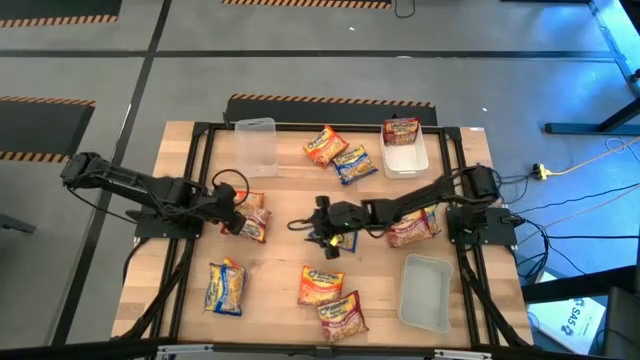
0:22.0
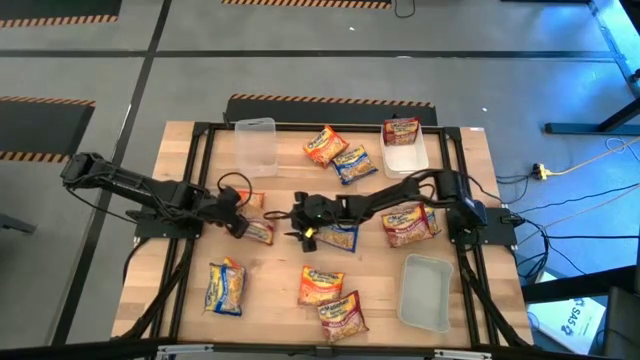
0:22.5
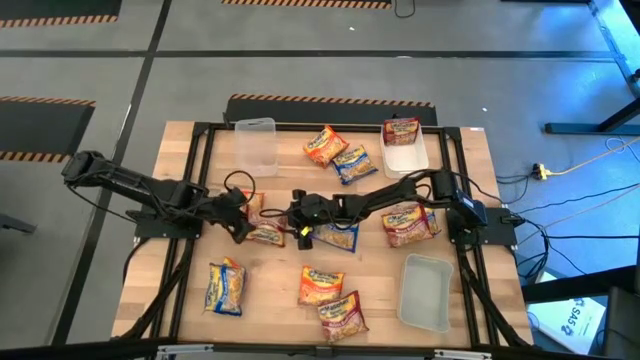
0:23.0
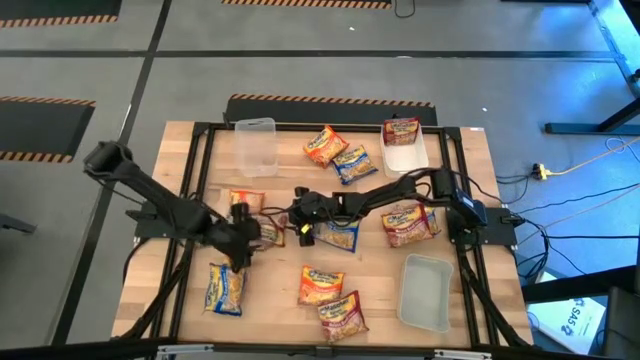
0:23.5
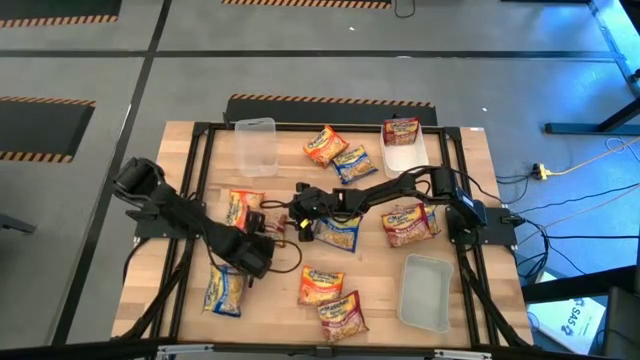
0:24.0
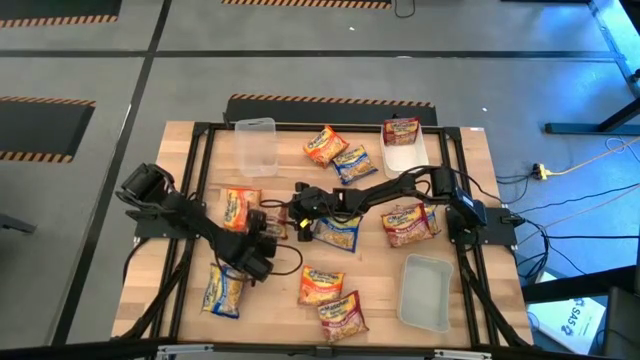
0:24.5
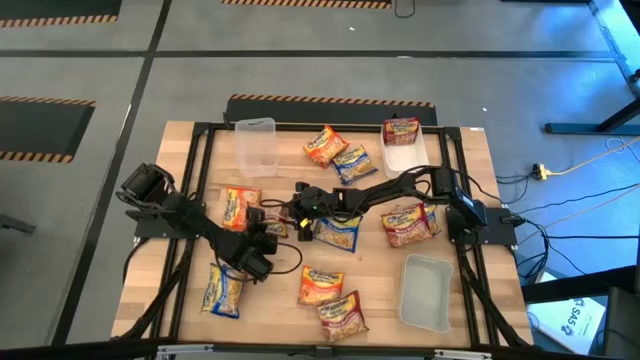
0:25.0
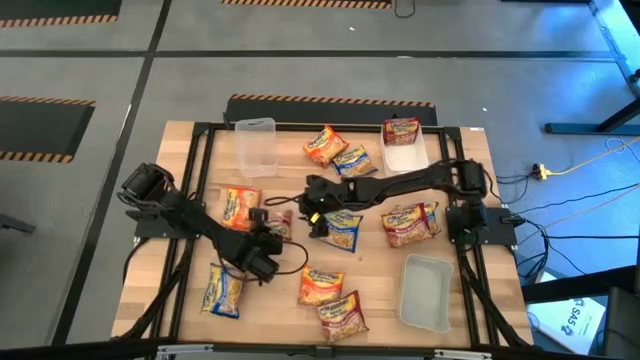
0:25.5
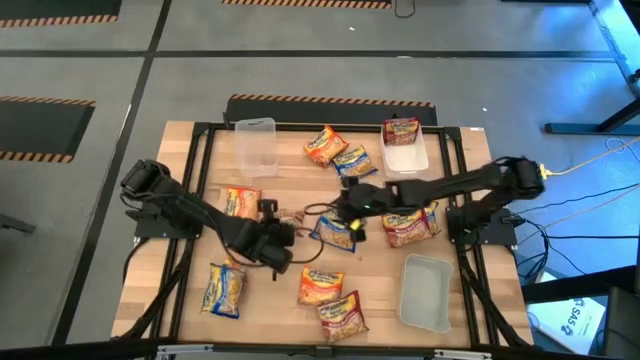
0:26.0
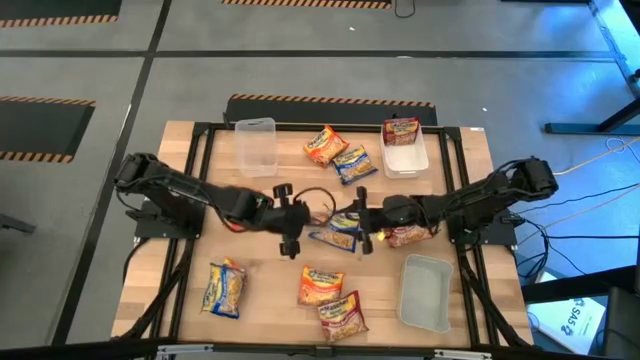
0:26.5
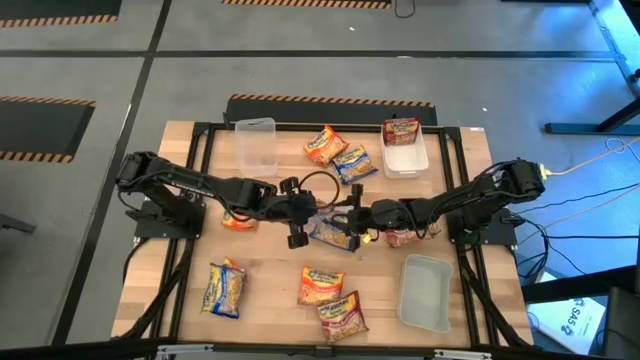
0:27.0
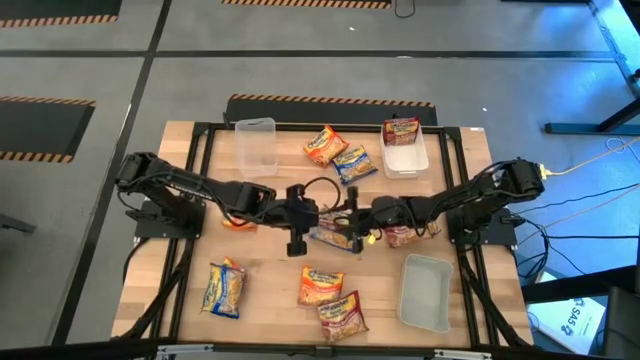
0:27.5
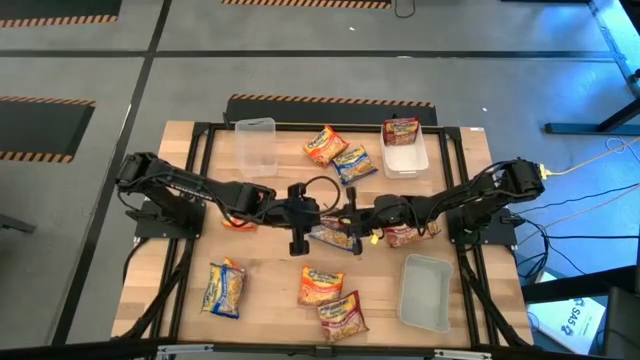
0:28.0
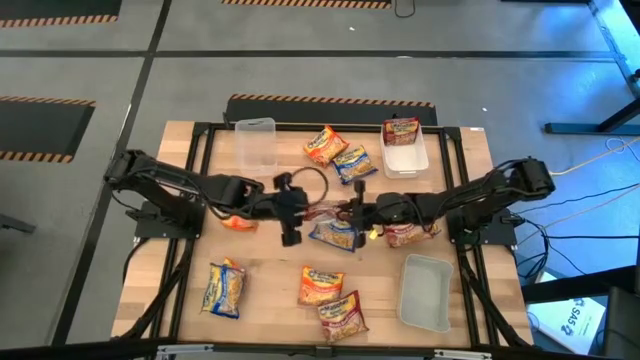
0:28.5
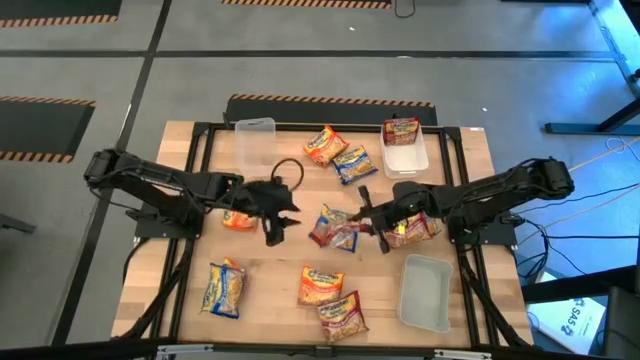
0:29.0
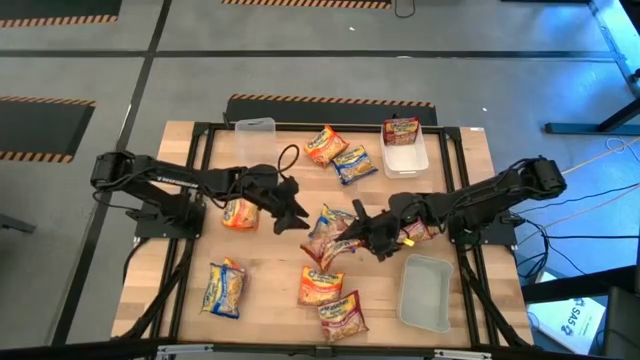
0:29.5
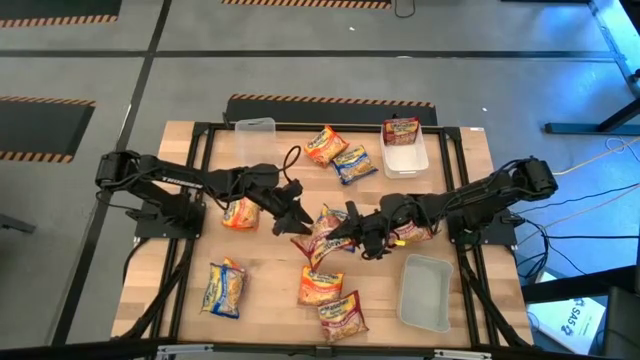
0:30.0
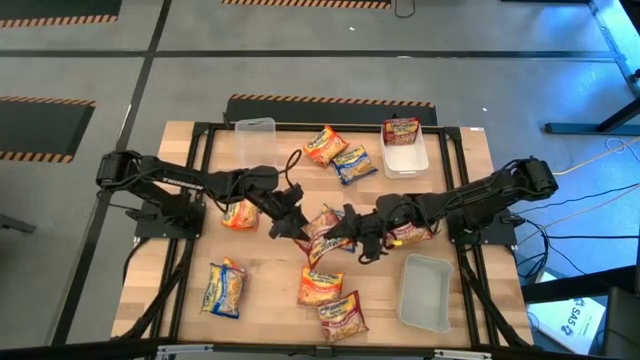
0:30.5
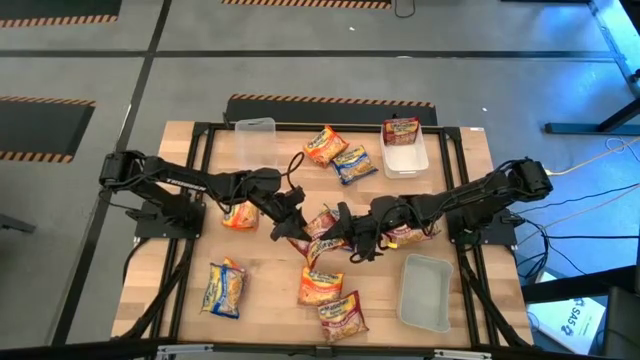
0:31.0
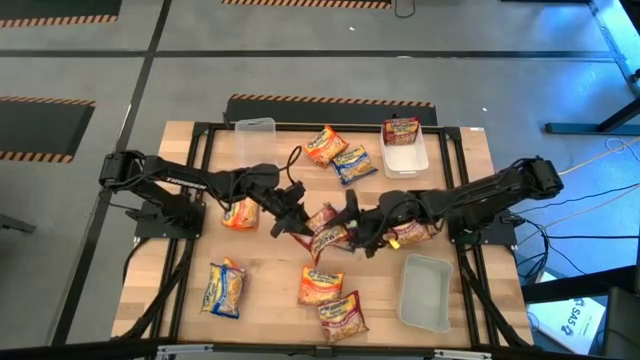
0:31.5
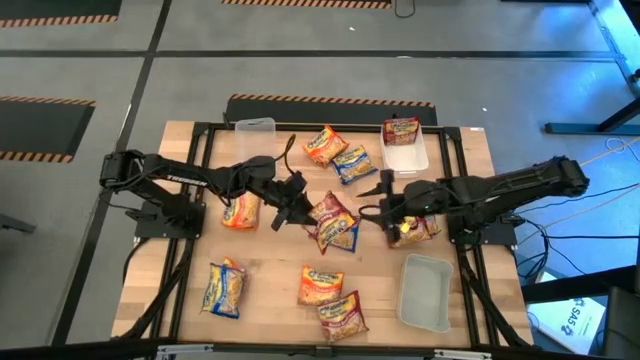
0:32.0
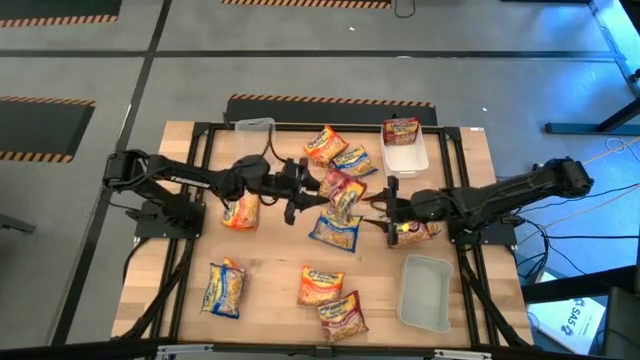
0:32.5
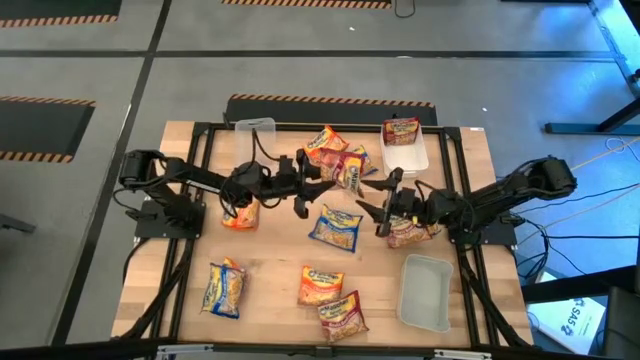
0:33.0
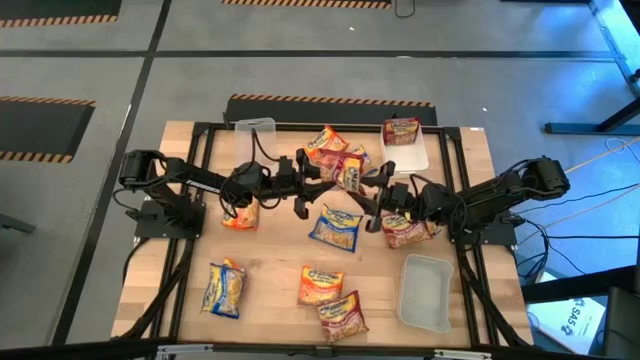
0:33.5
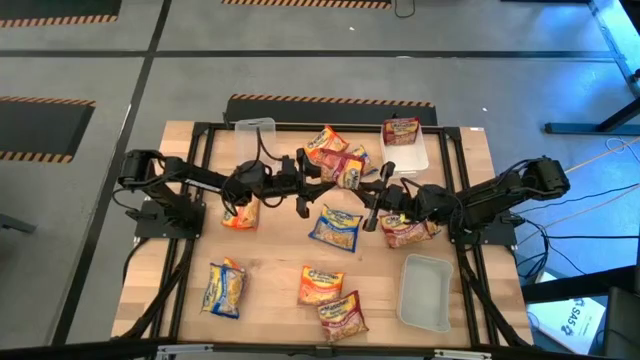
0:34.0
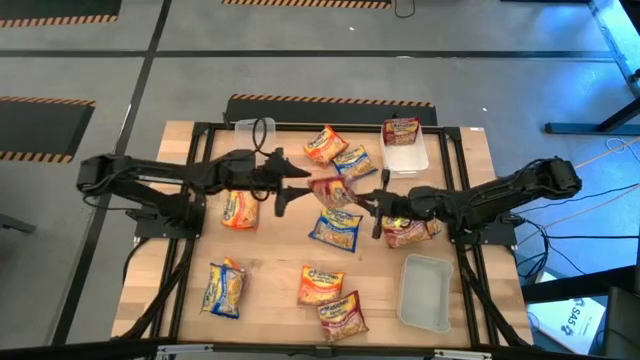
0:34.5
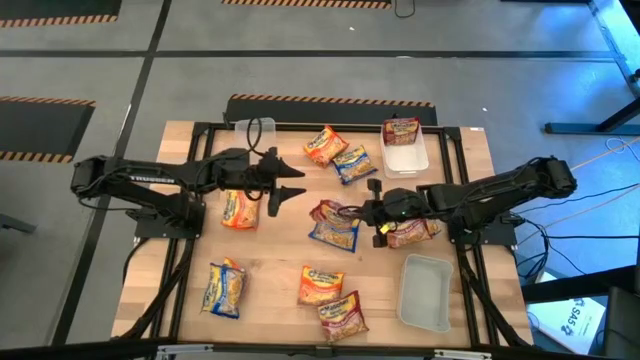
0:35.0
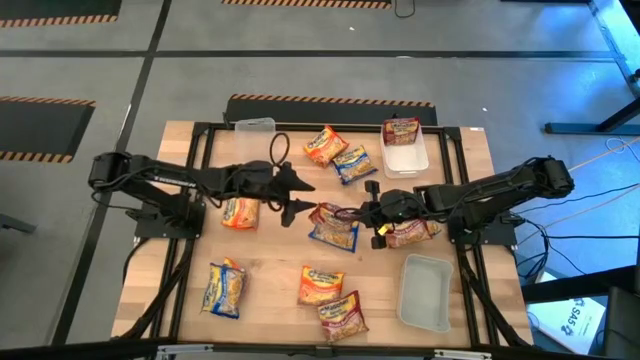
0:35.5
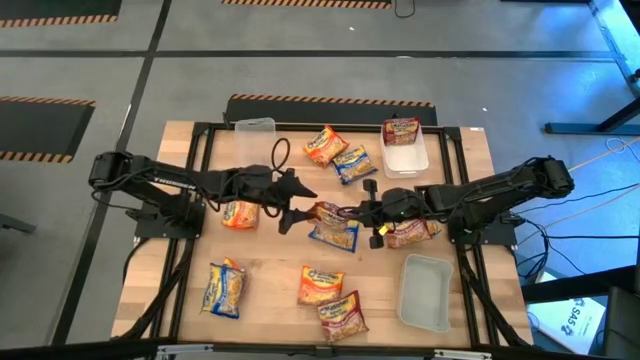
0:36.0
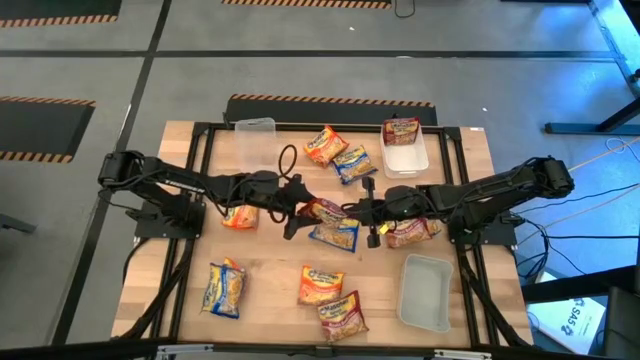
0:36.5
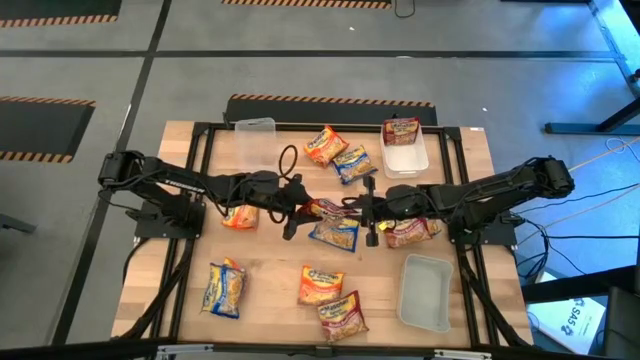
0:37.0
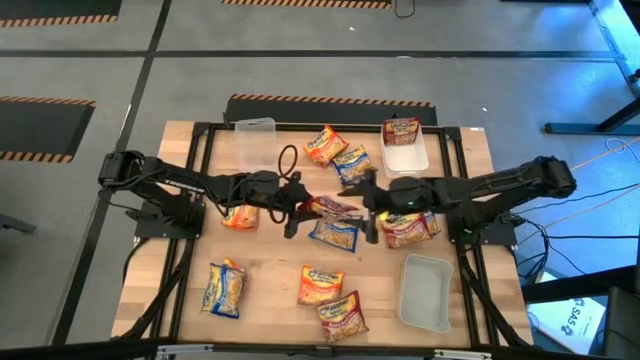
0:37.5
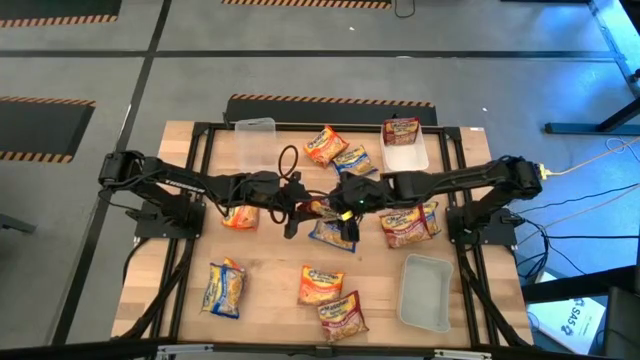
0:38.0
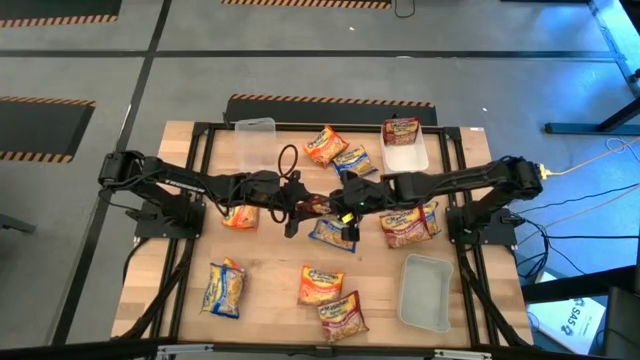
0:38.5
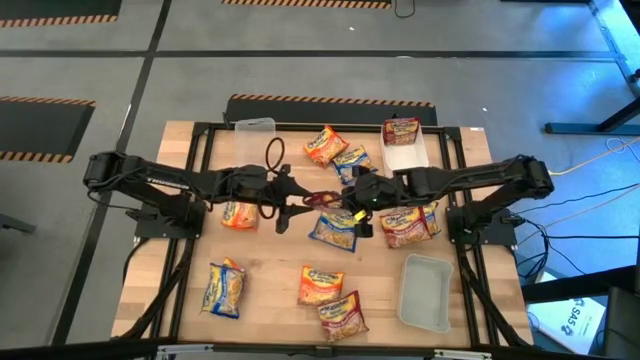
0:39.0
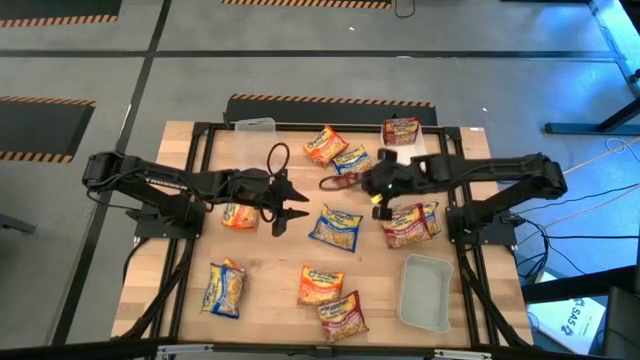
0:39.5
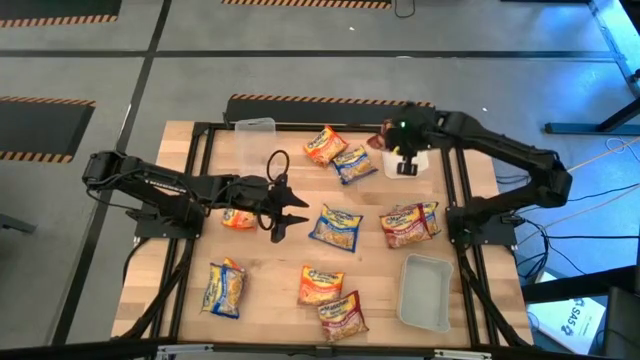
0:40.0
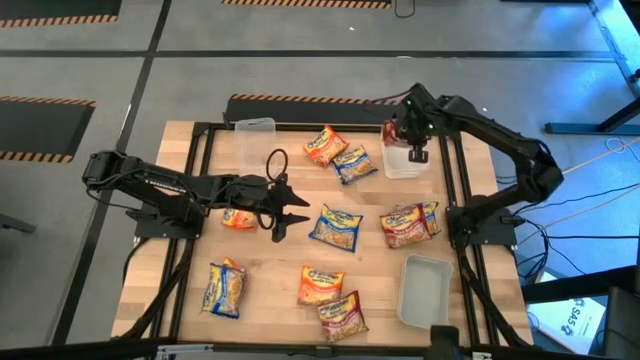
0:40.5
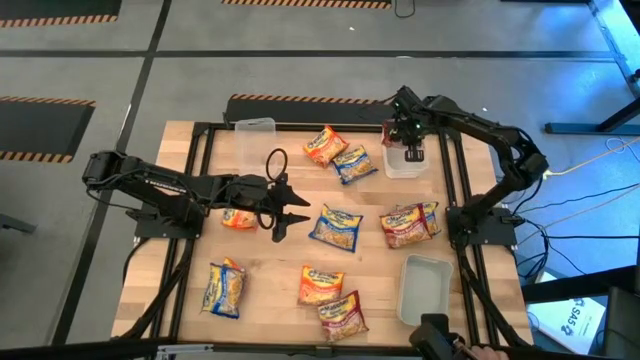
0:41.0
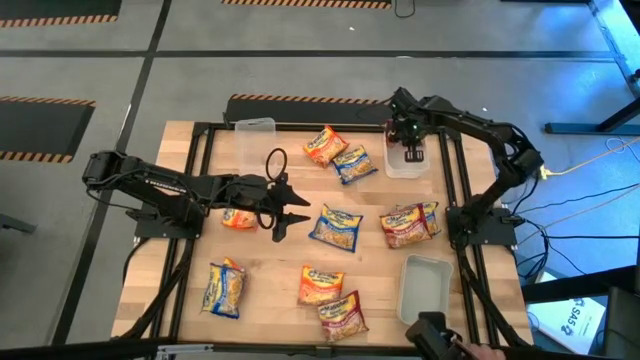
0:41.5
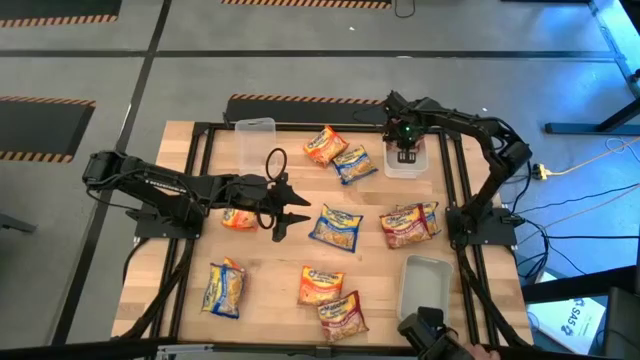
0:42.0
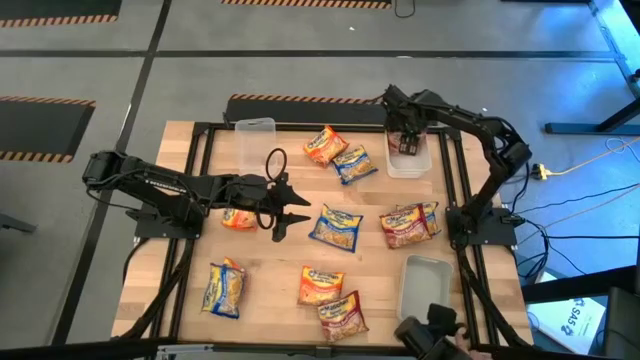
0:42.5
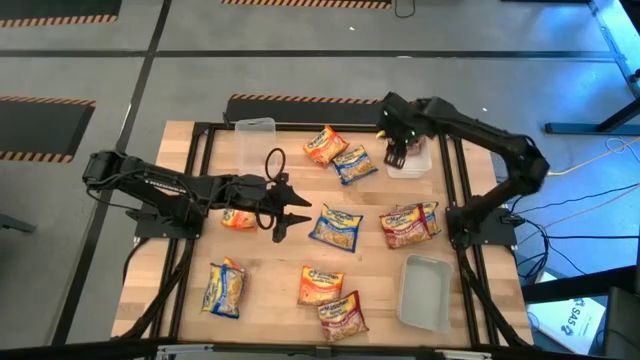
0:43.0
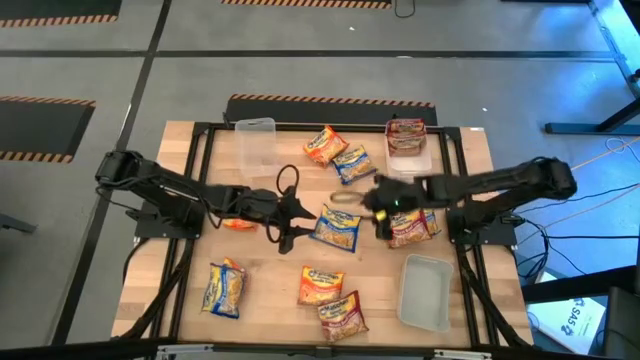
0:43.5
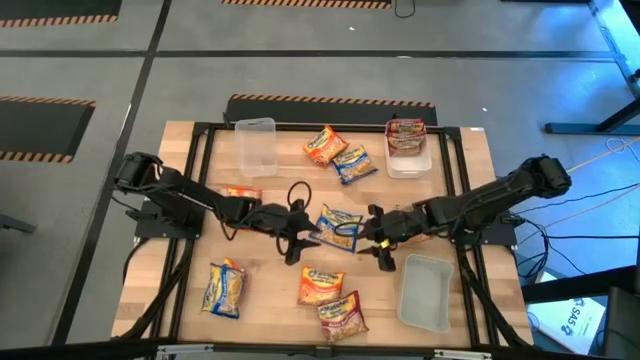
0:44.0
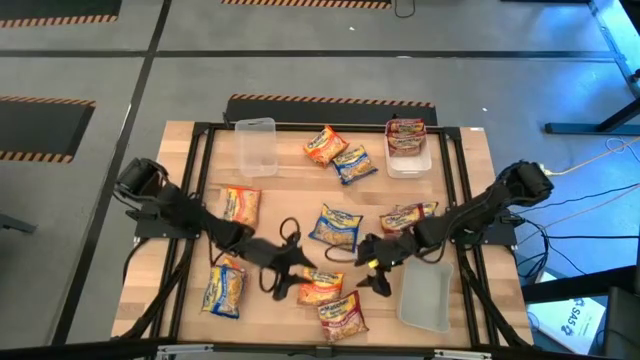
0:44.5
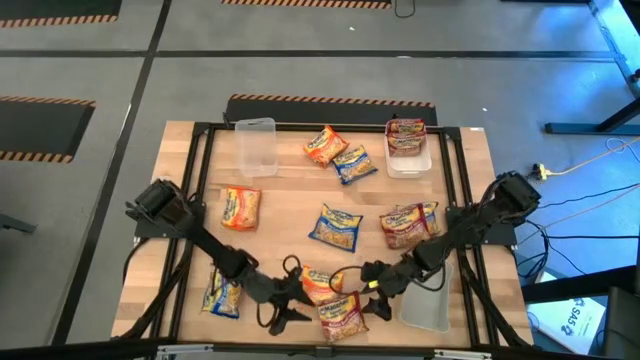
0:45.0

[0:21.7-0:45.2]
Task: Sort Maruchan noodles
Put the top left red noodle pack into the white bin
